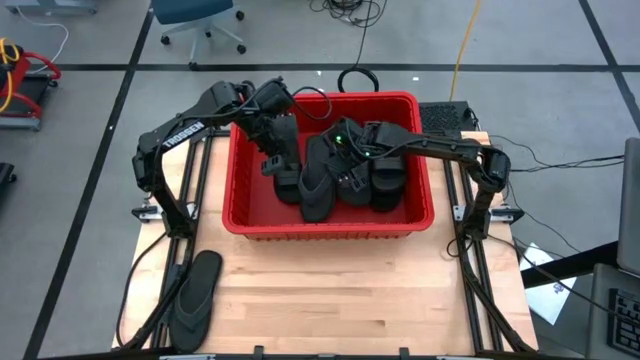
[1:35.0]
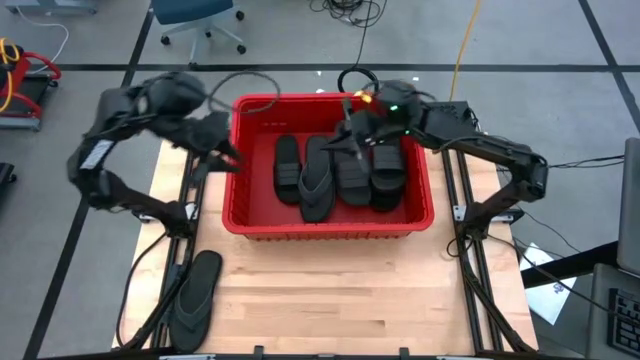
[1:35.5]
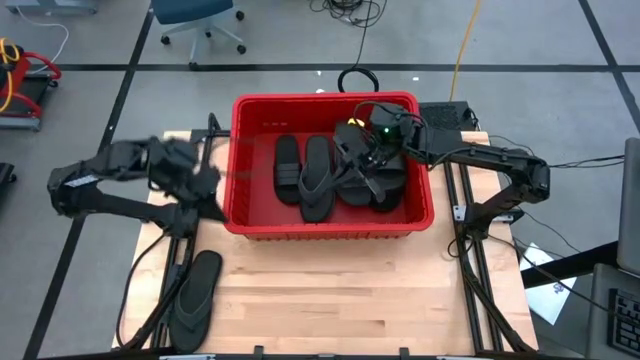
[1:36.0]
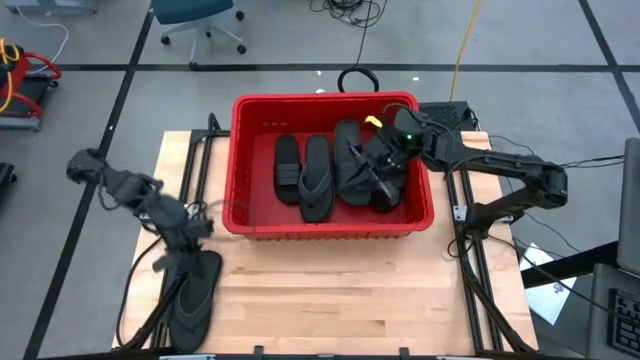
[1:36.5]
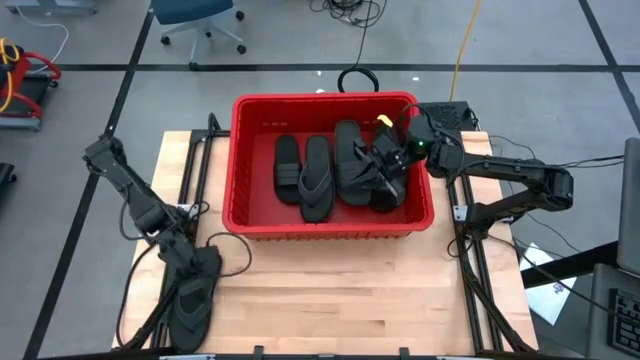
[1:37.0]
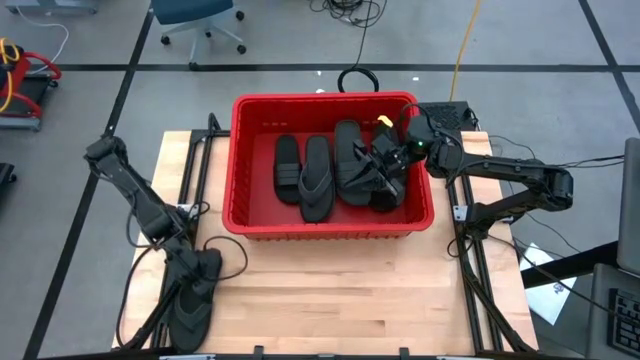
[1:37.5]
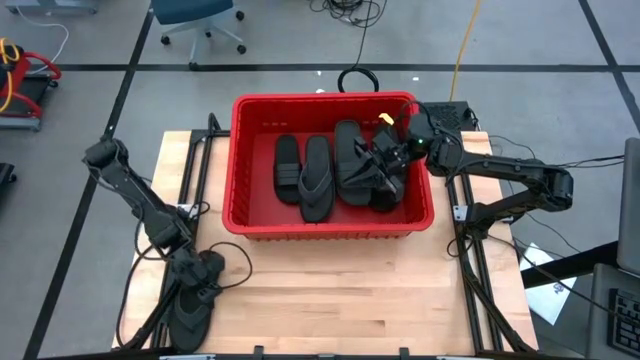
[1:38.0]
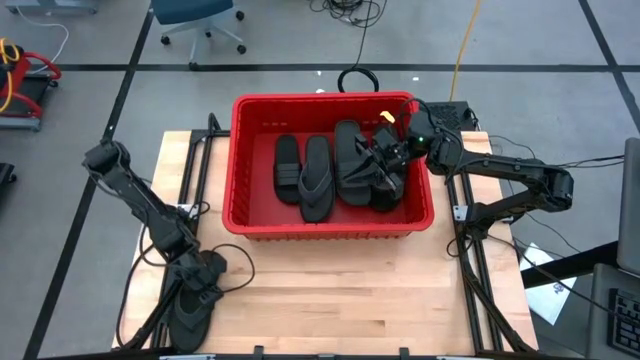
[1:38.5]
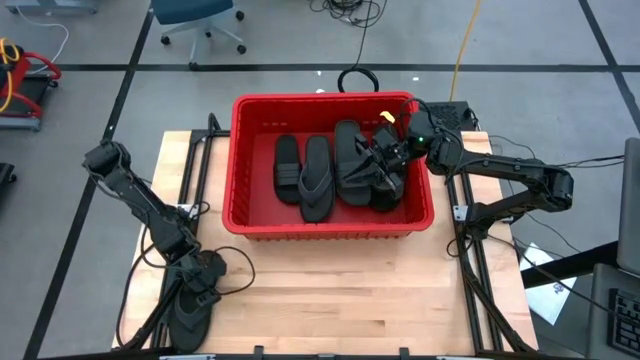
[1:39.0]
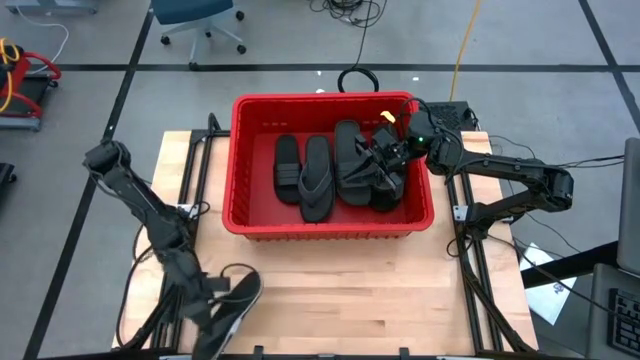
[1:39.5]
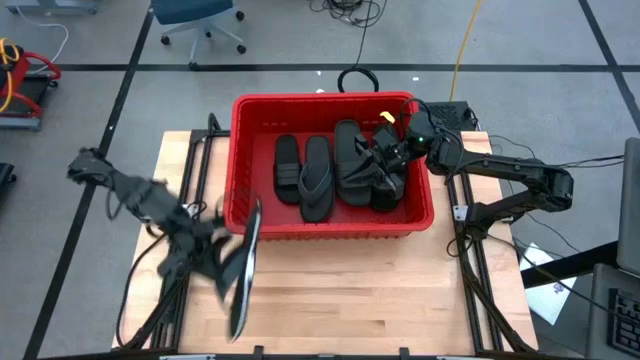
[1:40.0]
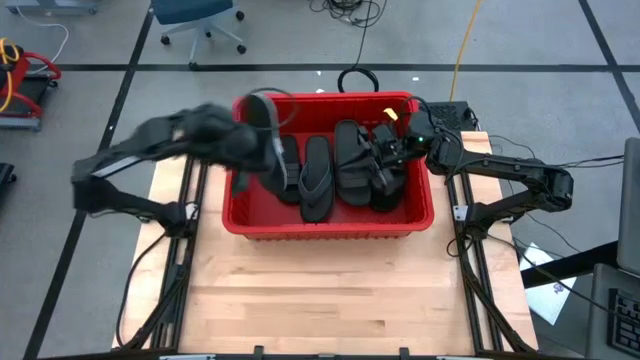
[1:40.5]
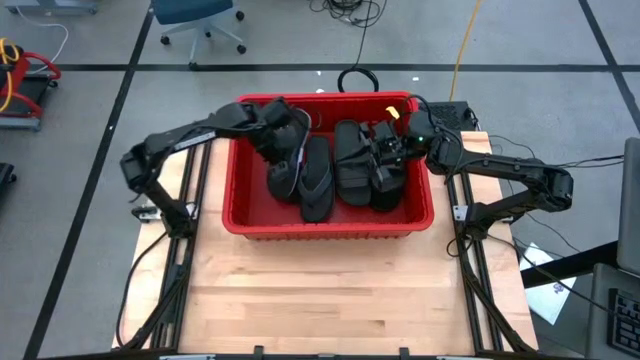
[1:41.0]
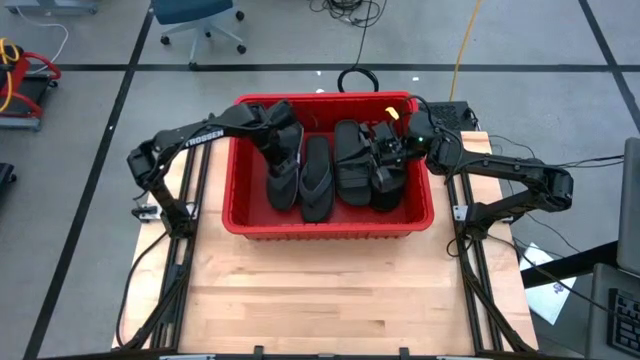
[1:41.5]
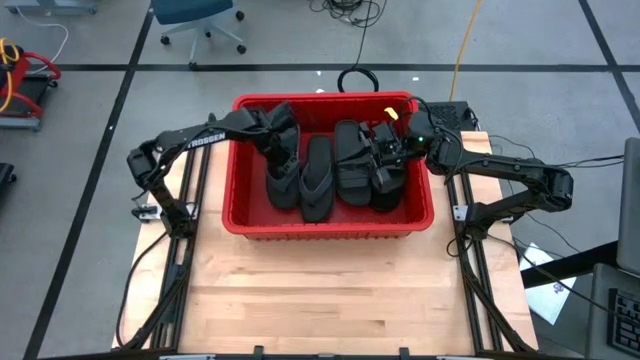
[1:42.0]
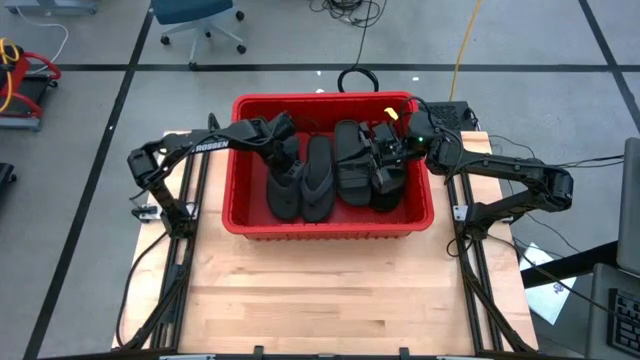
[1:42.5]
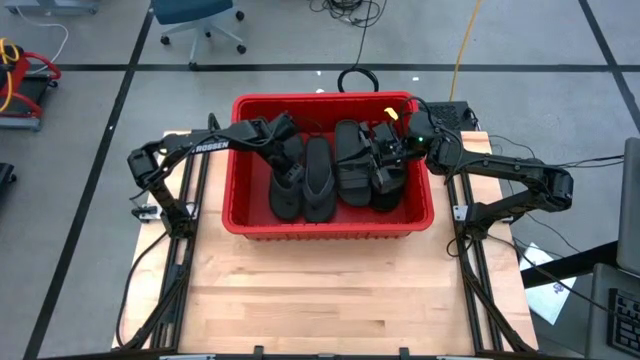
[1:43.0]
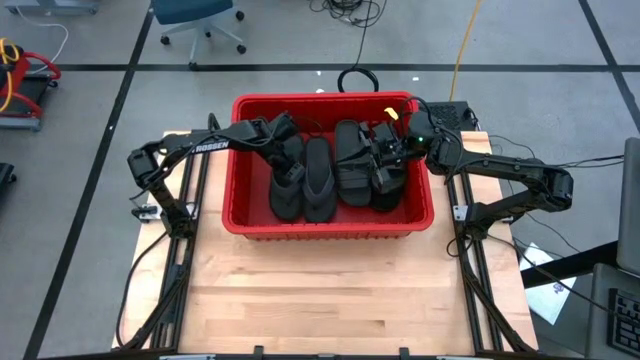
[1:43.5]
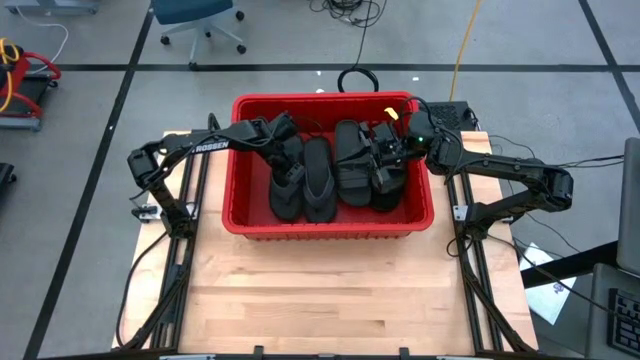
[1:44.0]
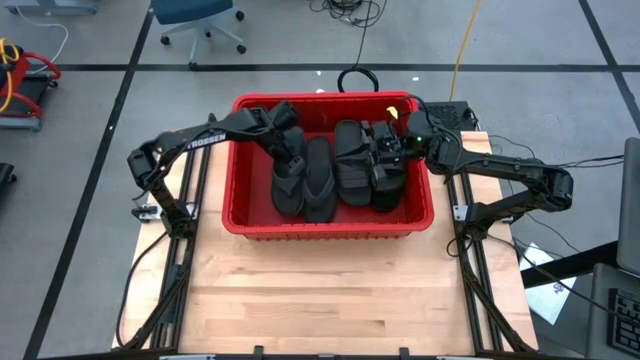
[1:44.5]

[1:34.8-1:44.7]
Task: Pick and place slides into bin
Put the black slipper into the red bin

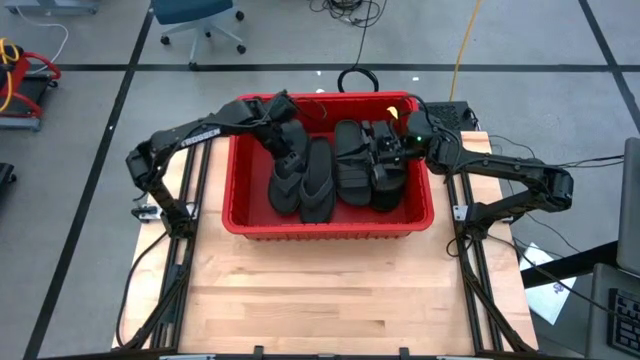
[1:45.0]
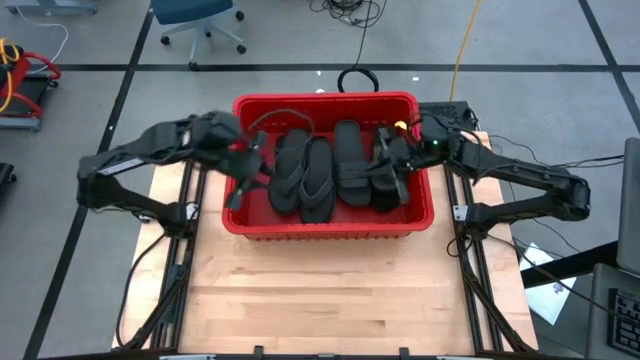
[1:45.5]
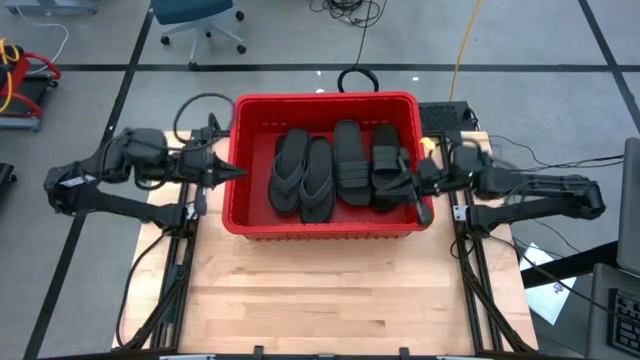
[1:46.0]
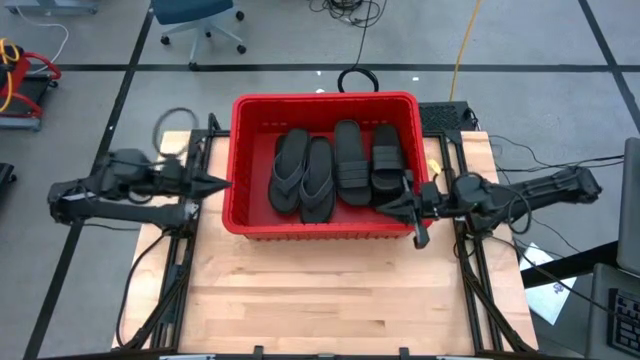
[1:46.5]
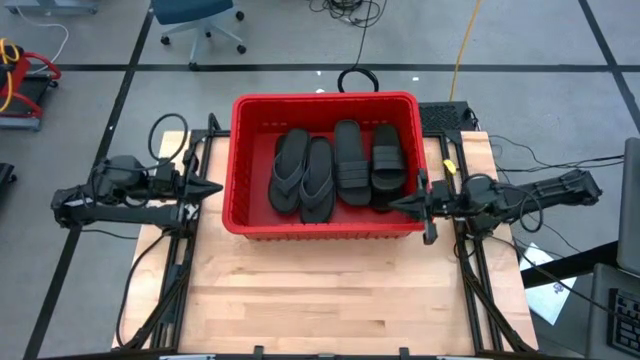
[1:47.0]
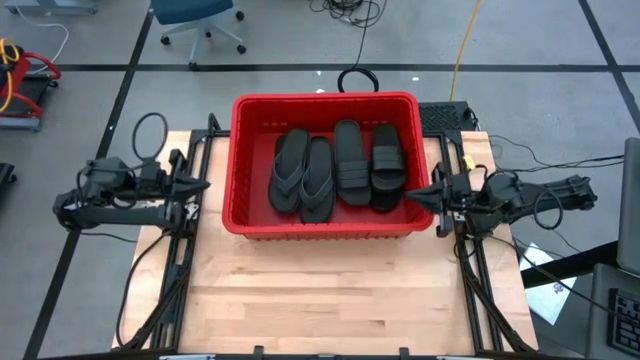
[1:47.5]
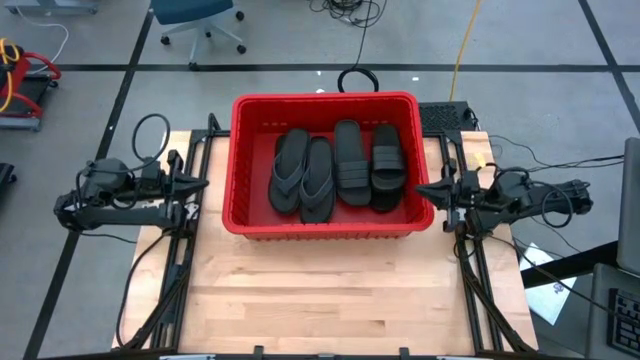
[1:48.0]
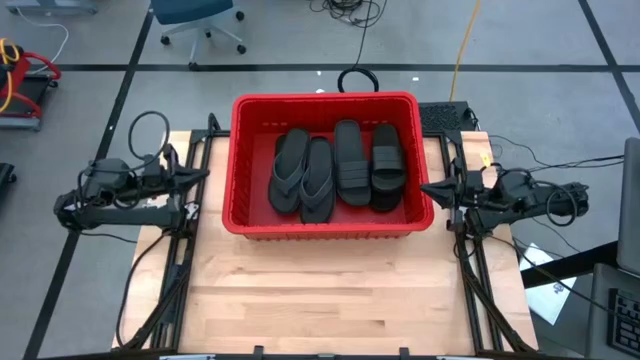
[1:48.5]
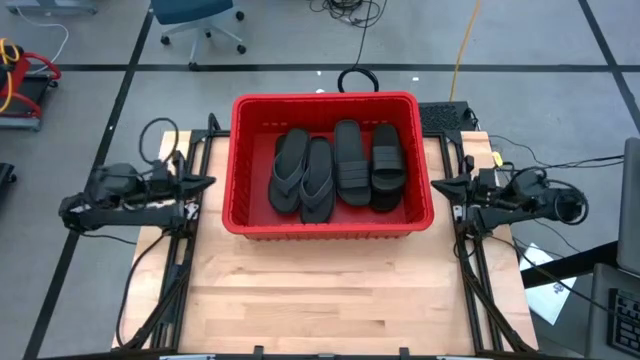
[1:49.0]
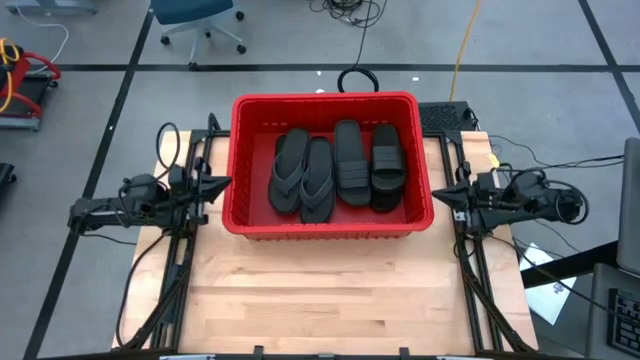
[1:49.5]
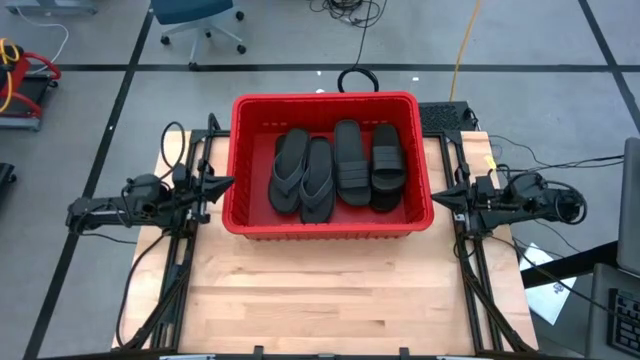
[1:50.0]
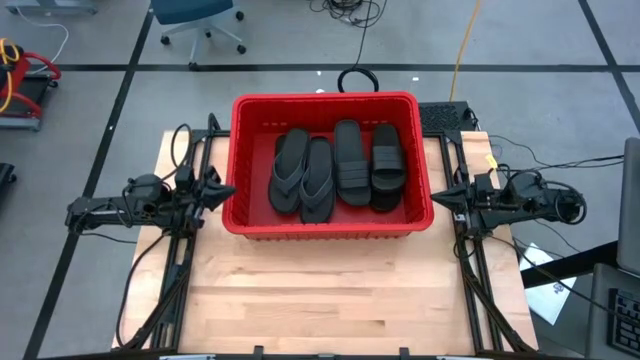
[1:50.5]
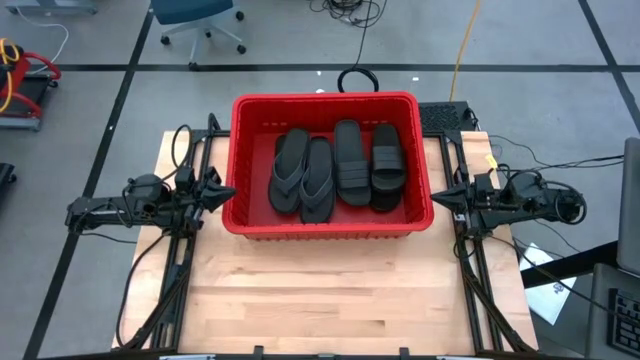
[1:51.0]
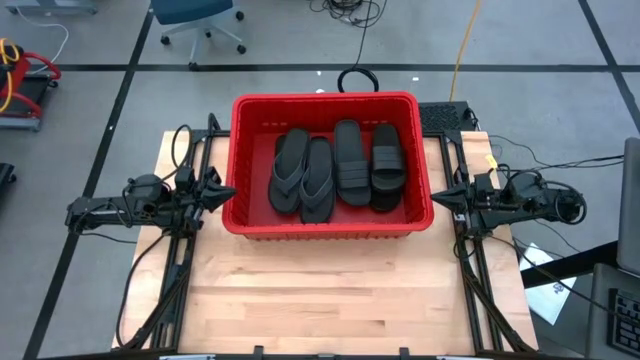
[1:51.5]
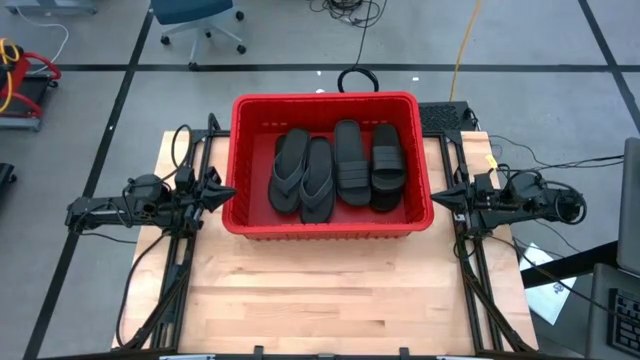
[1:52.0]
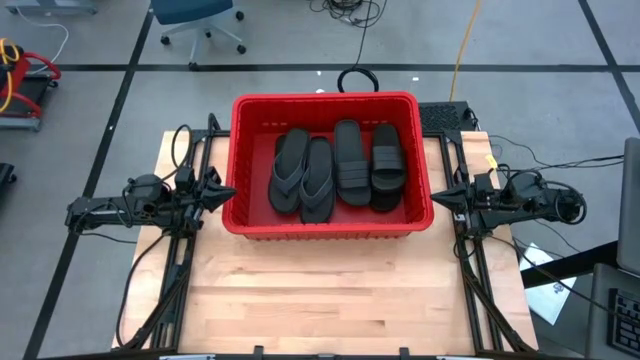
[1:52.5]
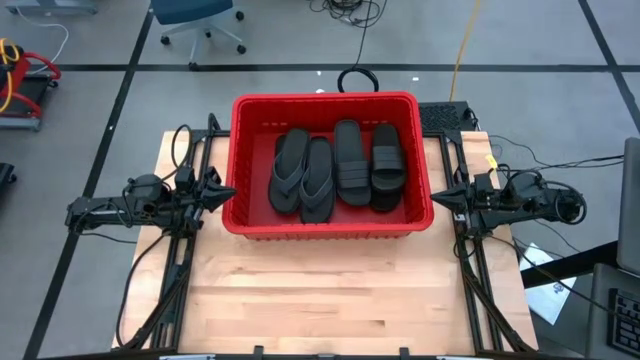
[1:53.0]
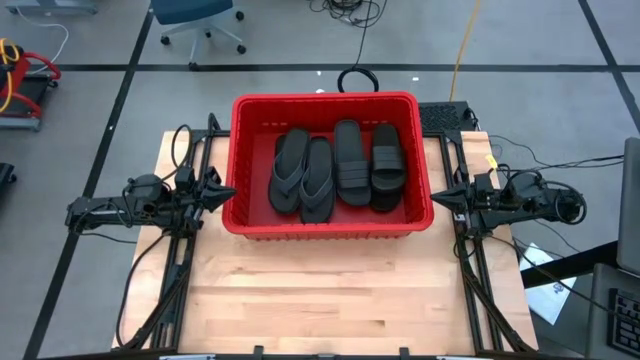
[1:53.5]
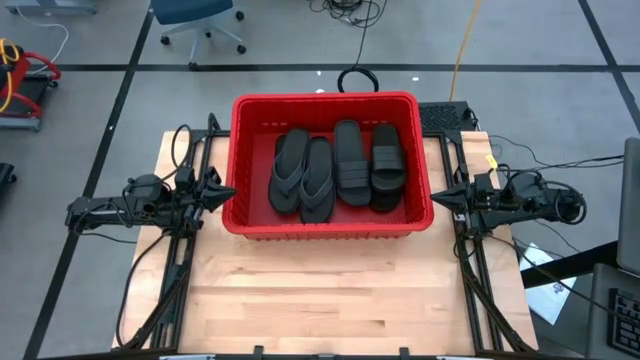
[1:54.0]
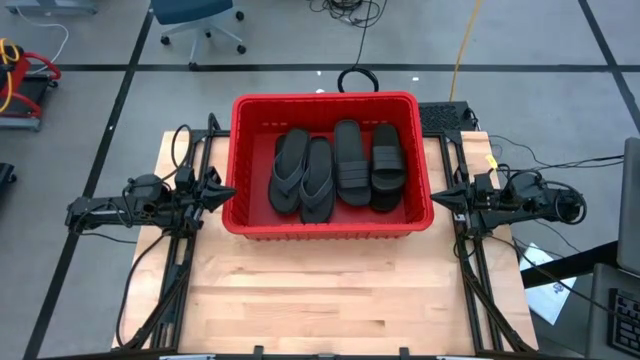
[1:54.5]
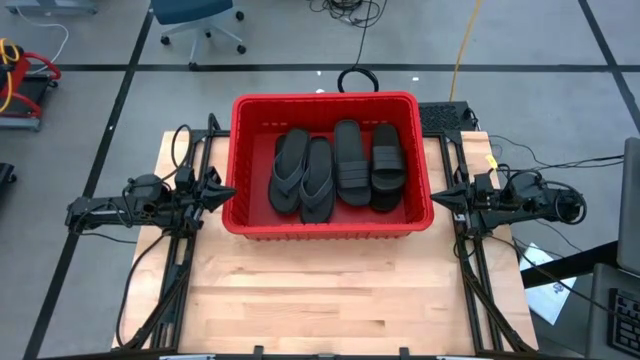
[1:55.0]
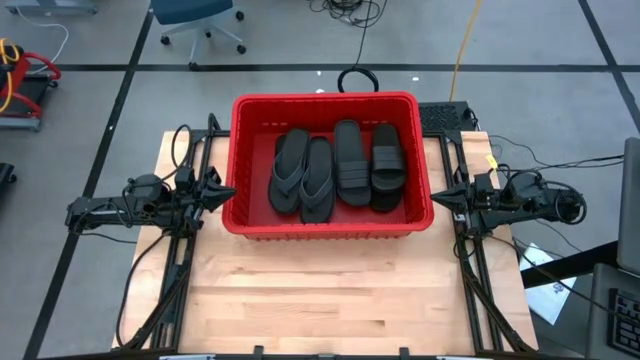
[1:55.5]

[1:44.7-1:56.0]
Return to Home Position
